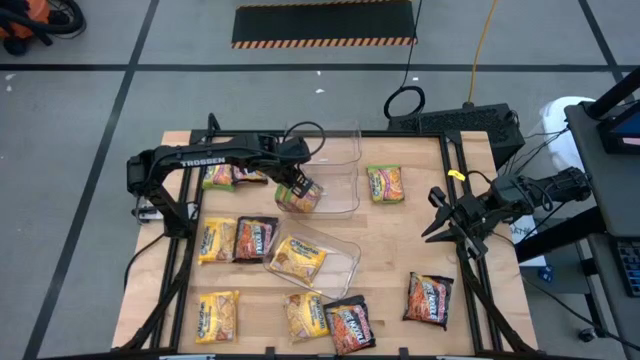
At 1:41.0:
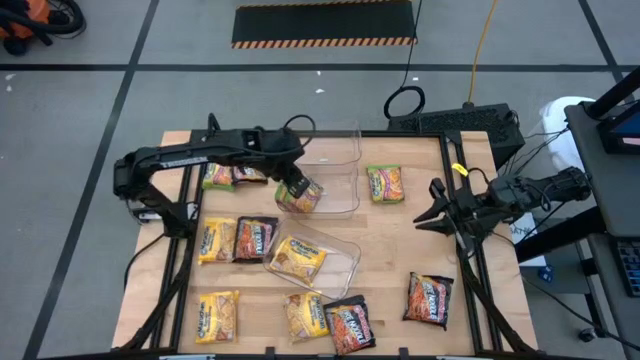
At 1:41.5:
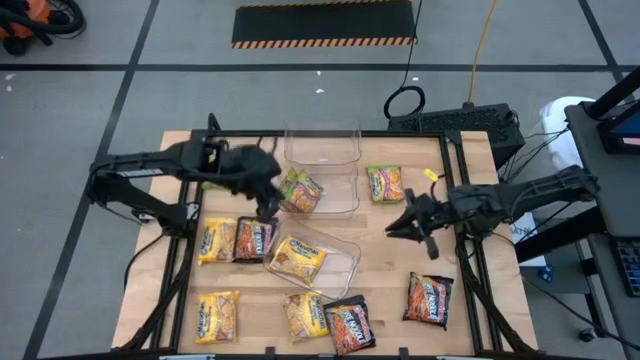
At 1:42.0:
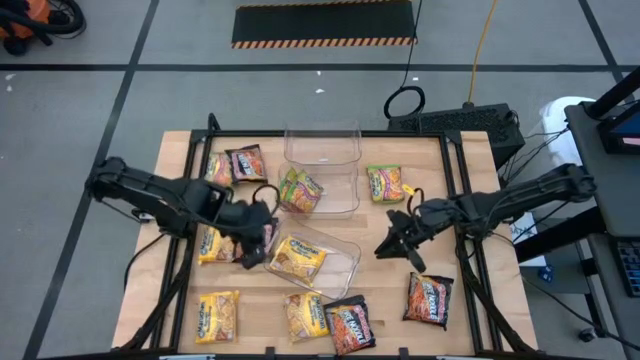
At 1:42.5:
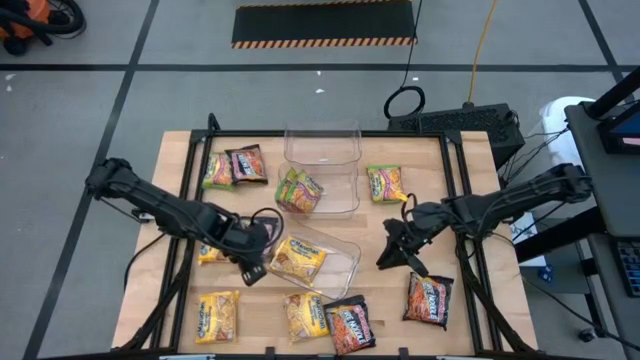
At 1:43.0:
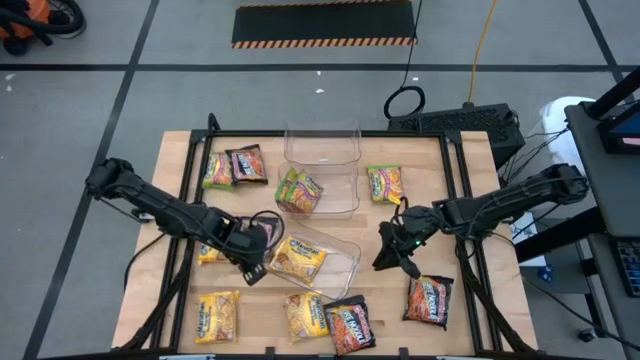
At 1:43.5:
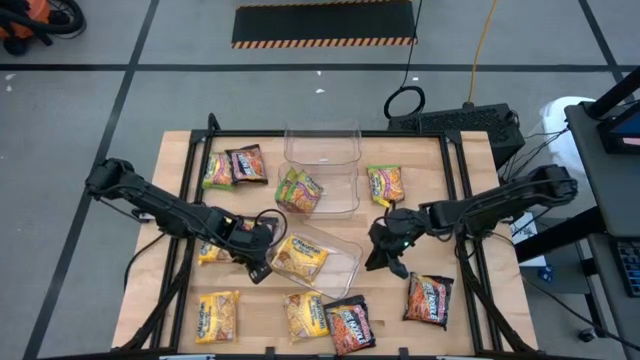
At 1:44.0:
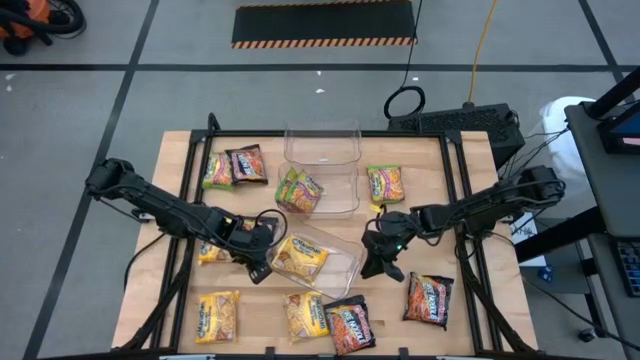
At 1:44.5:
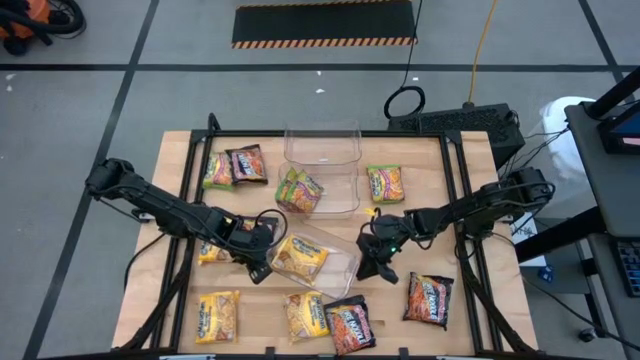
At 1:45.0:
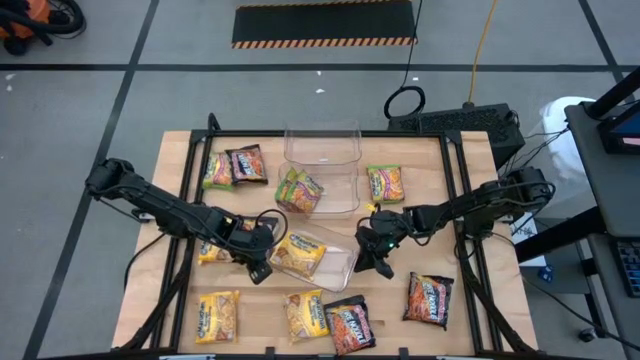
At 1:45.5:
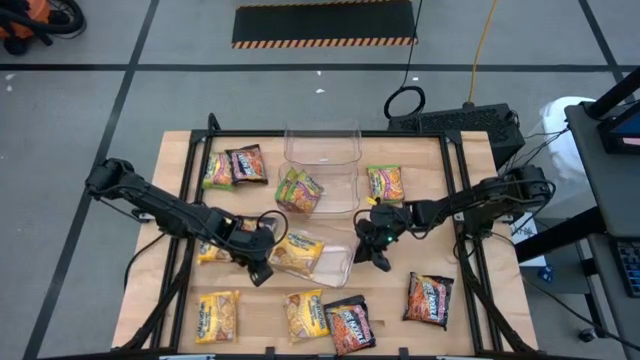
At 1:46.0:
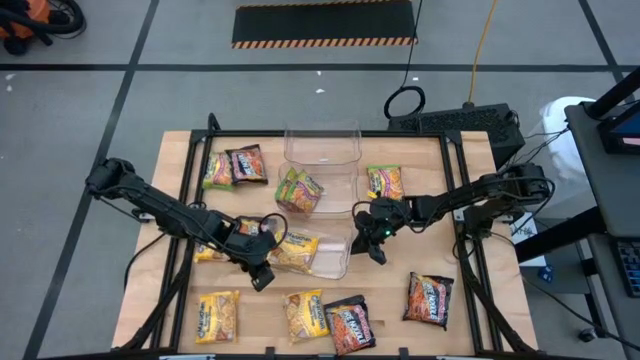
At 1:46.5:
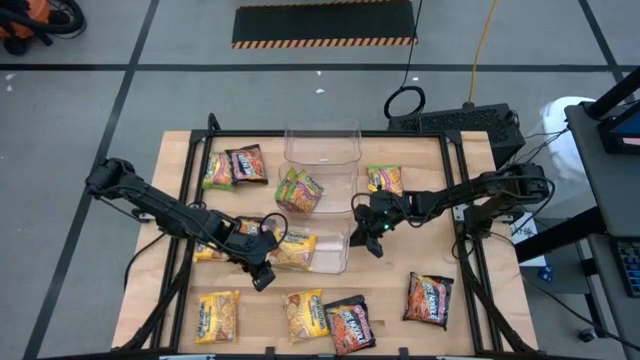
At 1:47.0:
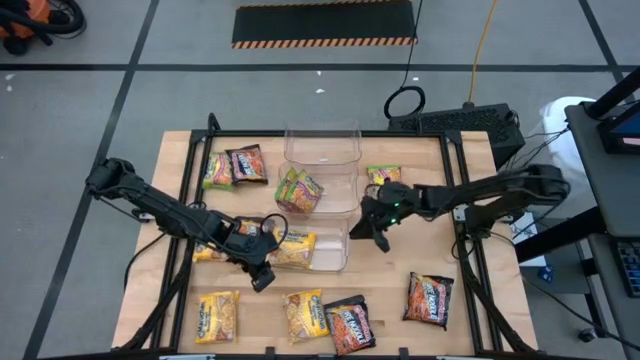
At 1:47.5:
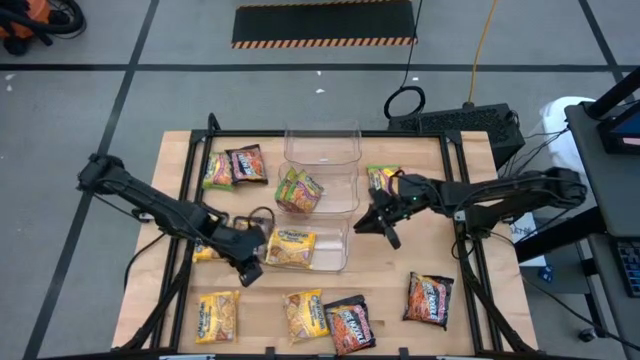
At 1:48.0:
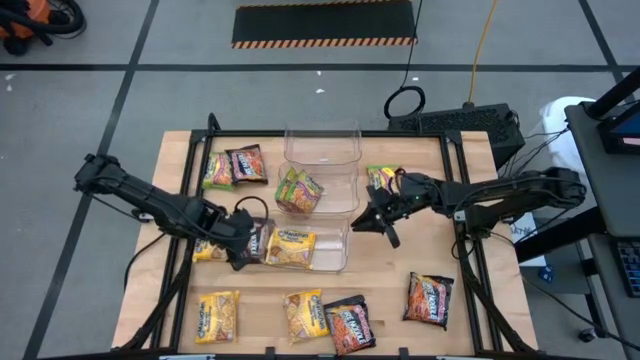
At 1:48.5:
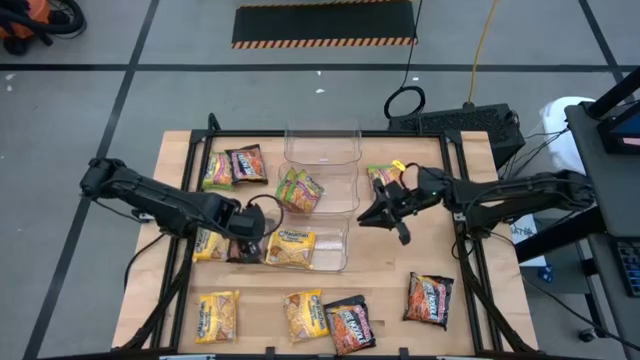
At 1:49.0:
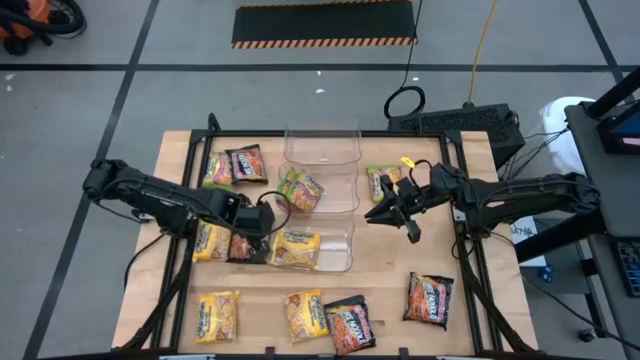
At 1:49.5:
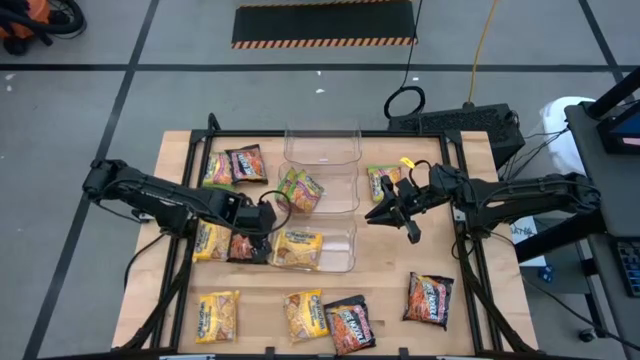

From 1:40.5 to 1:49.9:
Task: Sort Maruchan noodles
Adjust the bottom transparent bin

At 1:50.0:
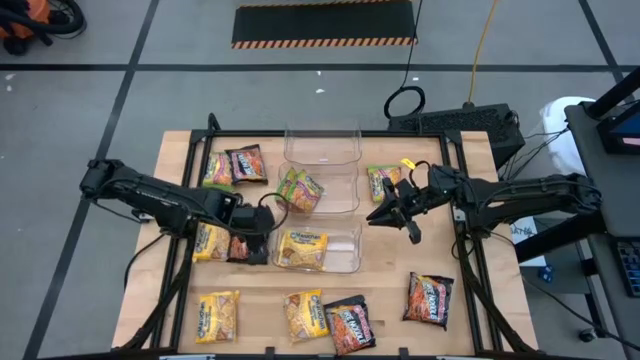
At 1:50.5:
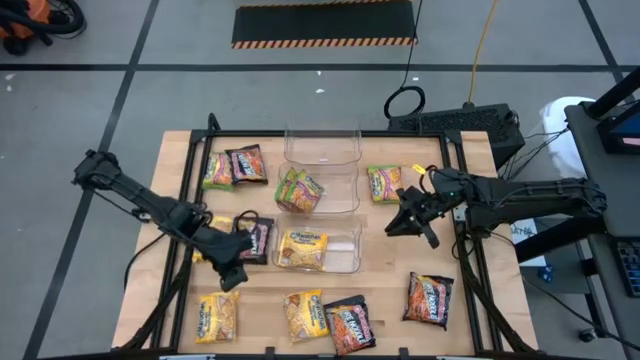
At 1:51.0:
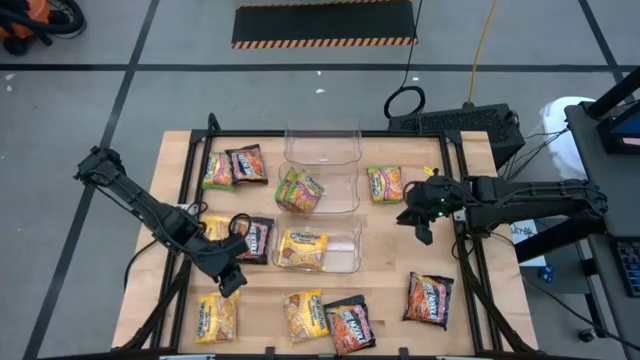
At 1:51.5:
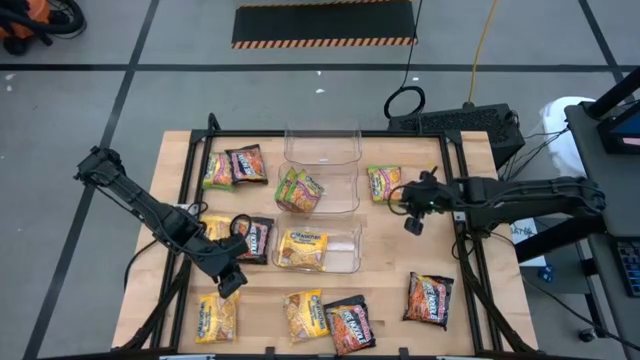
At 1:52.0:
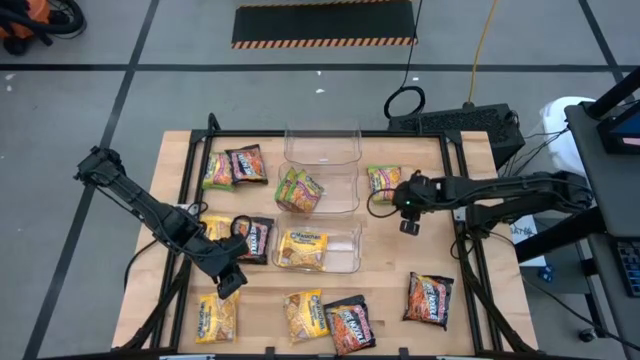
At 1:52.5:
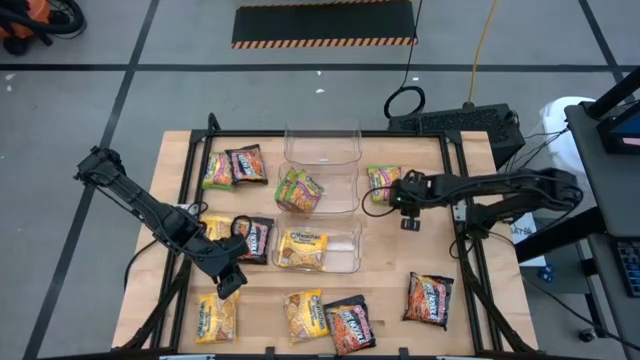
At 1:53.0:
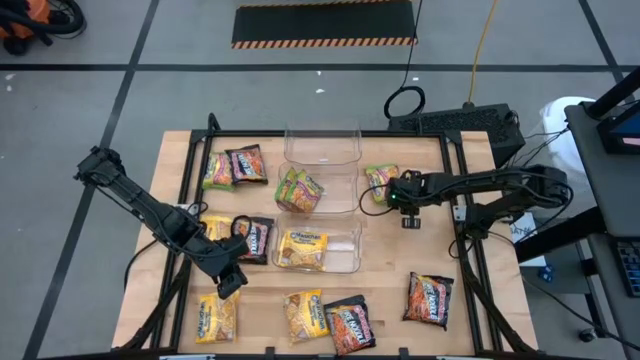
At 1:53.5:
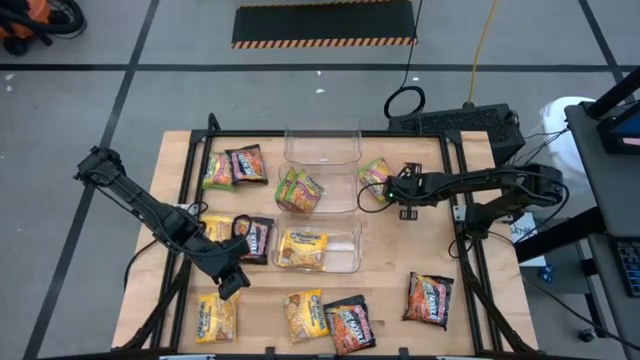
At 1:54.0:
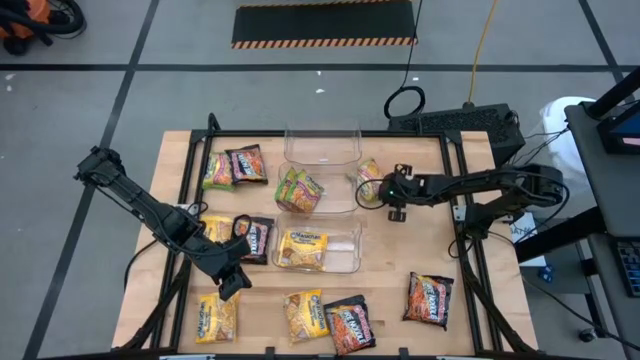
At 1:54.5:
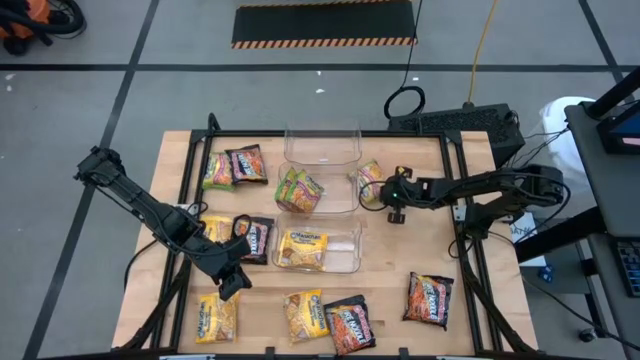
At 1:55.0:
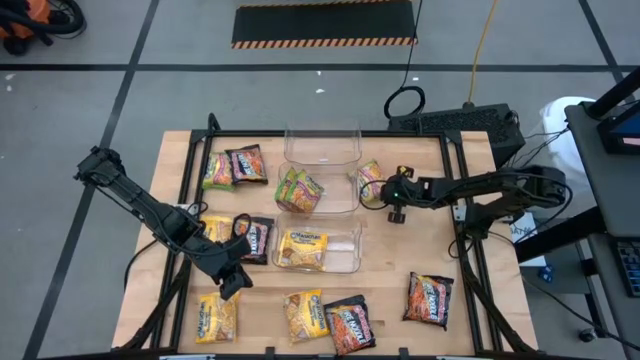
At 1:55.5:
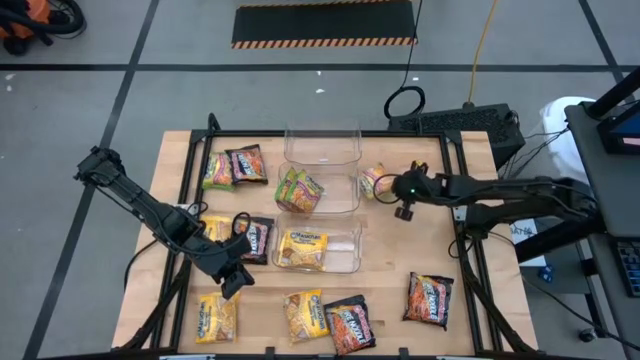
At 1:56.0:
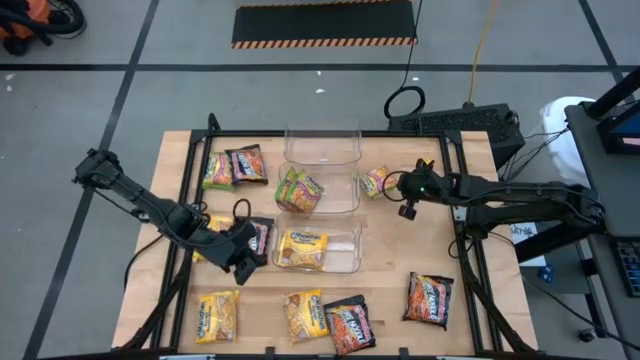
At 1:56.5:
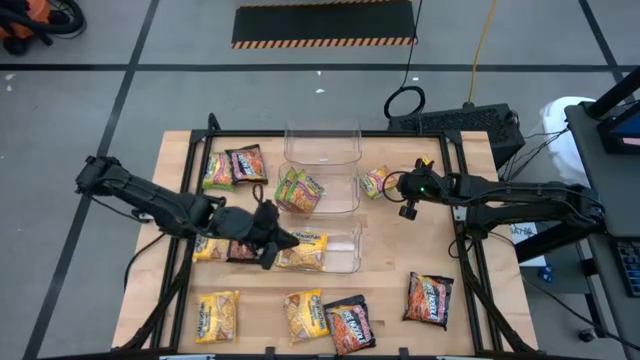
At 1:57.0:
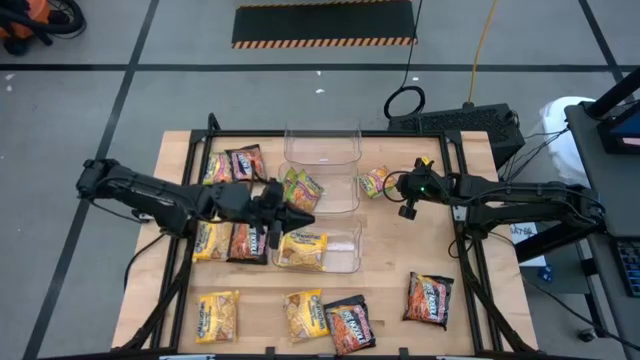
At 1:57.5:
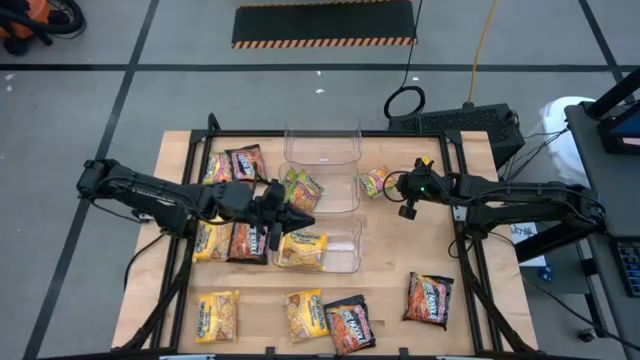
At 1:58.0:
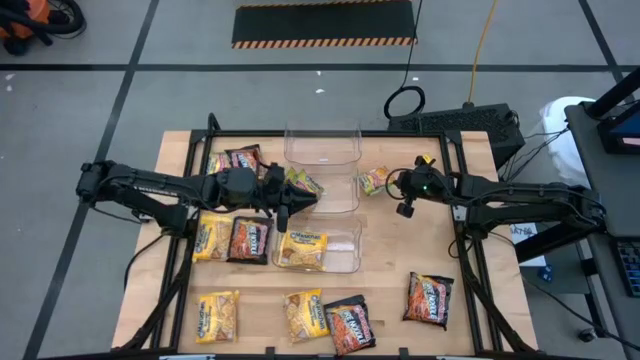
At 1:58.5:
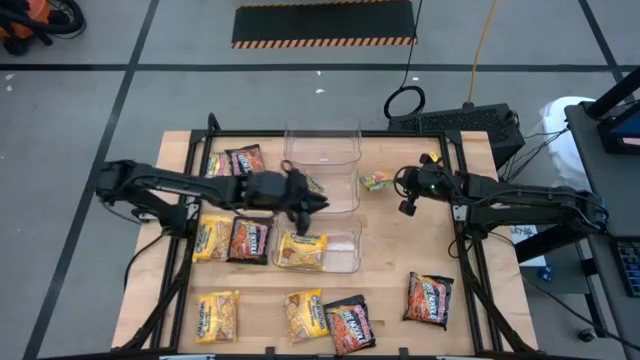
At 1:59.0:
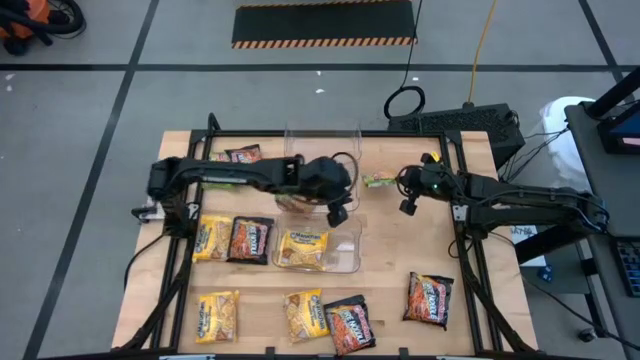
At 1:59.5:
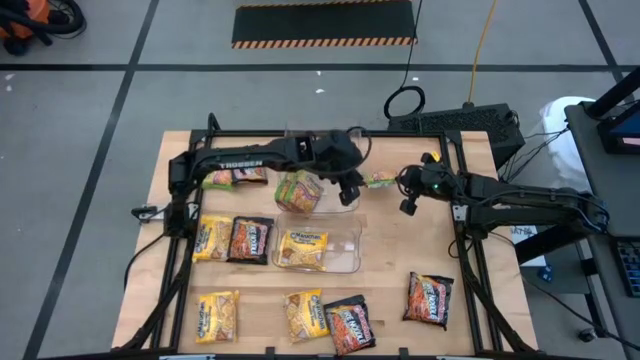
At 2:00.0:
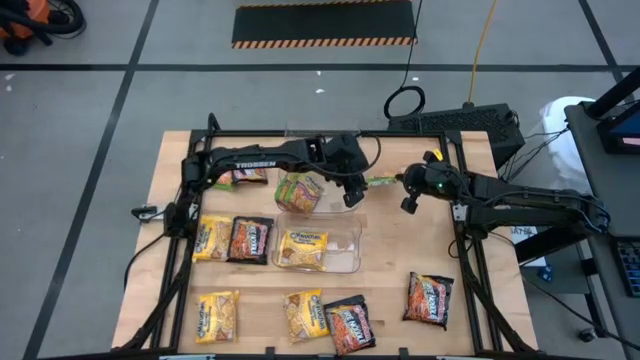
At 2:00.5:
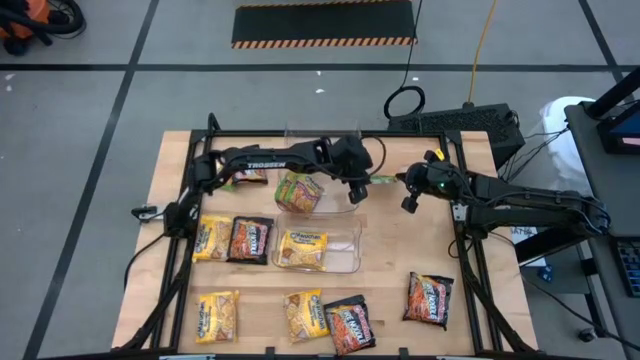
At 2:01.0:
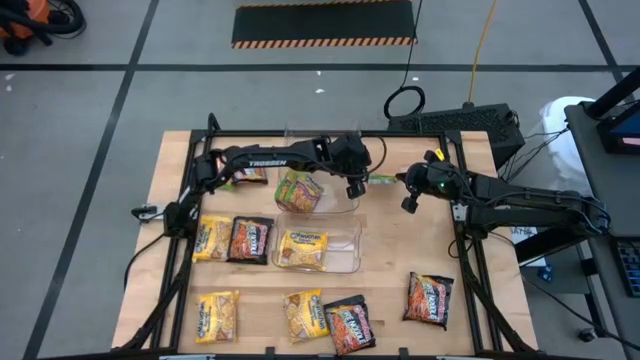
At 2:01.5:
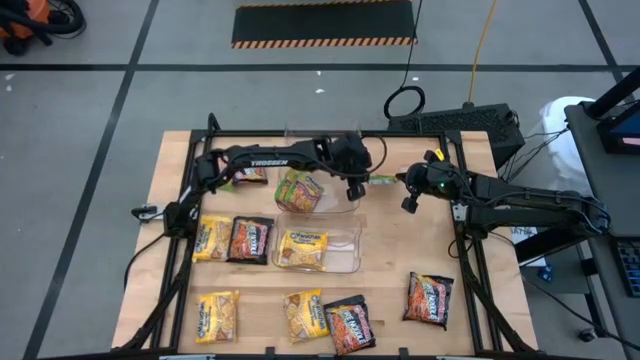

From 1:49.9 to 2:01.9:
Put the green noodle pack into the center transparent bin
